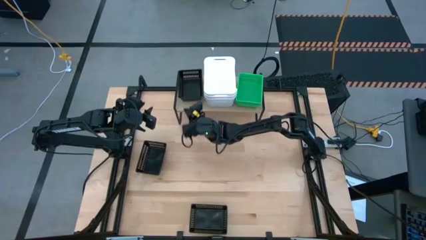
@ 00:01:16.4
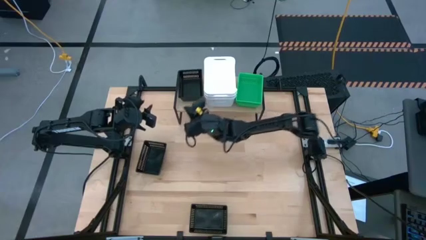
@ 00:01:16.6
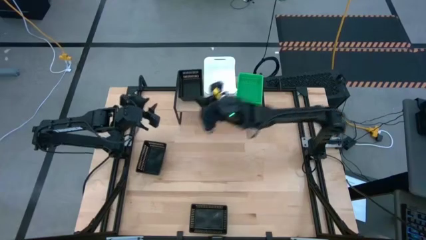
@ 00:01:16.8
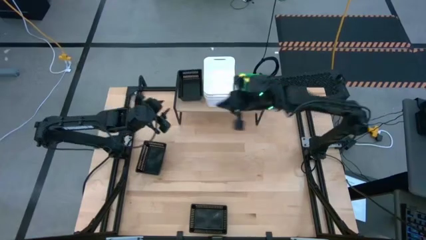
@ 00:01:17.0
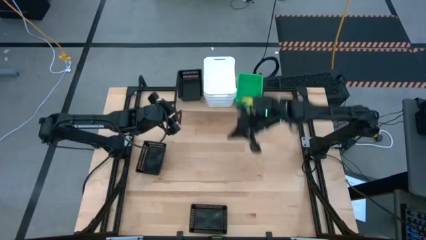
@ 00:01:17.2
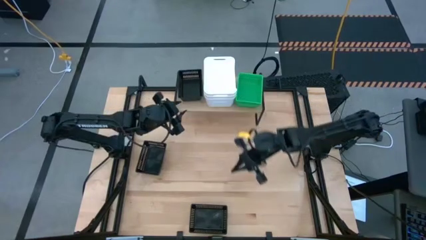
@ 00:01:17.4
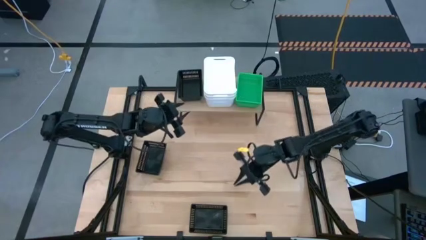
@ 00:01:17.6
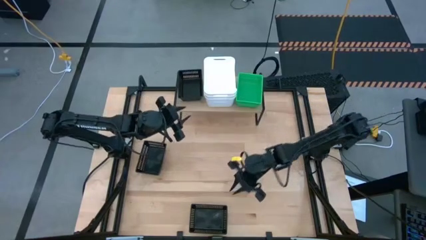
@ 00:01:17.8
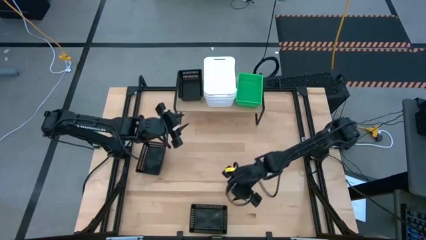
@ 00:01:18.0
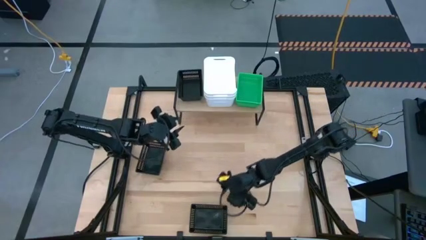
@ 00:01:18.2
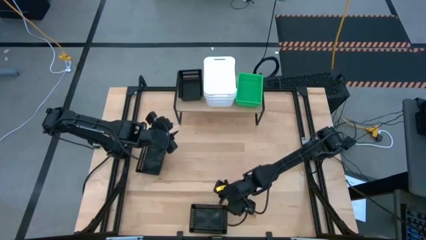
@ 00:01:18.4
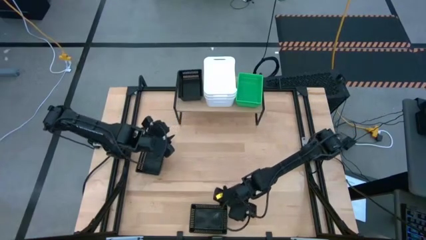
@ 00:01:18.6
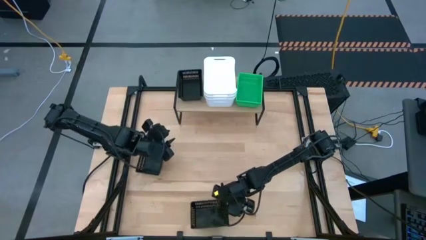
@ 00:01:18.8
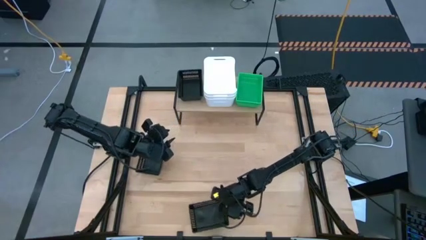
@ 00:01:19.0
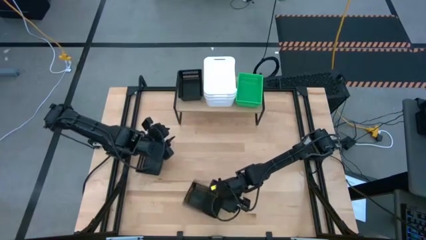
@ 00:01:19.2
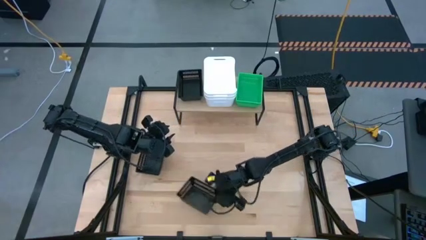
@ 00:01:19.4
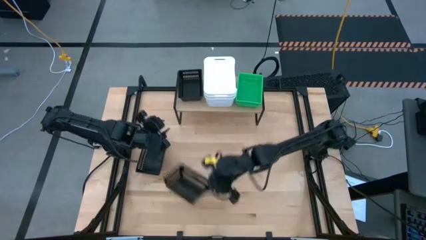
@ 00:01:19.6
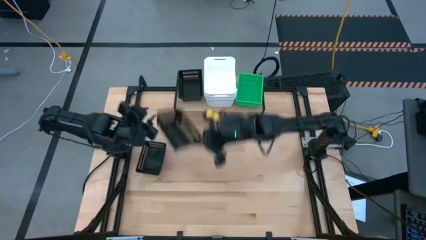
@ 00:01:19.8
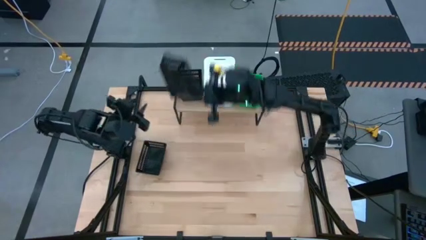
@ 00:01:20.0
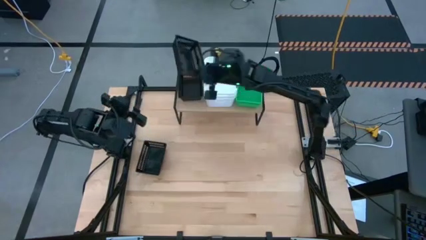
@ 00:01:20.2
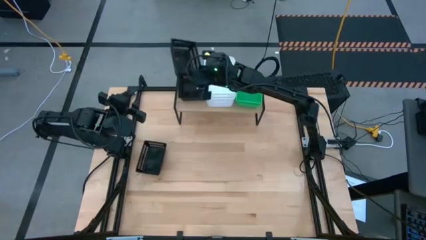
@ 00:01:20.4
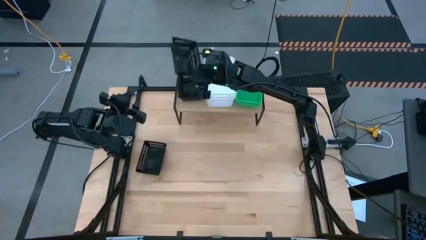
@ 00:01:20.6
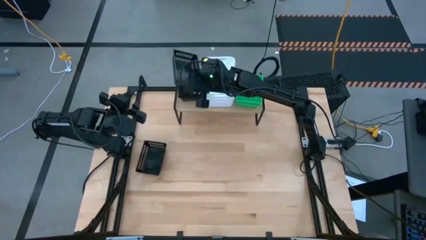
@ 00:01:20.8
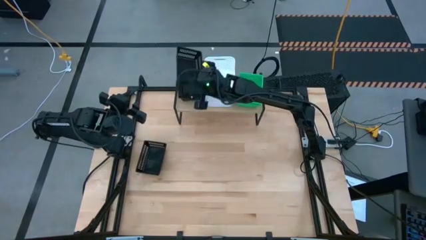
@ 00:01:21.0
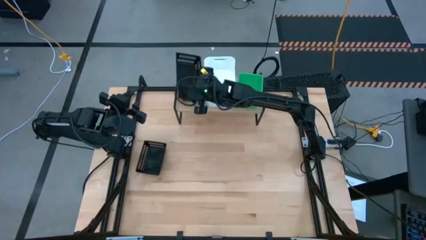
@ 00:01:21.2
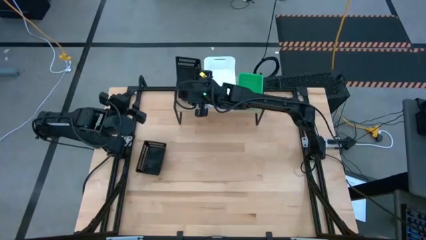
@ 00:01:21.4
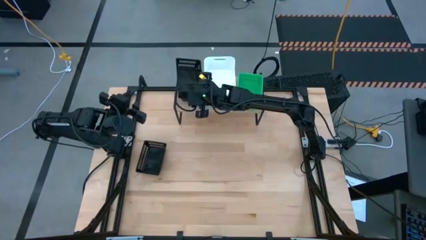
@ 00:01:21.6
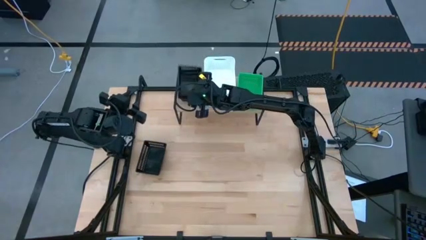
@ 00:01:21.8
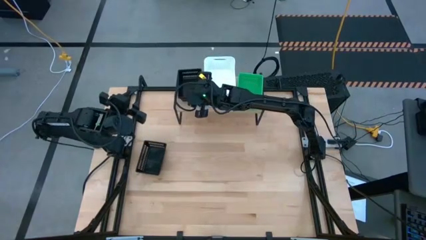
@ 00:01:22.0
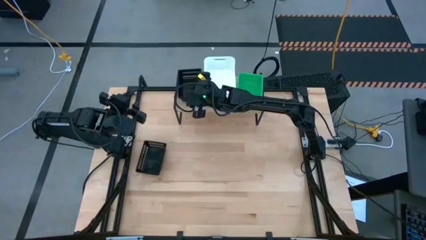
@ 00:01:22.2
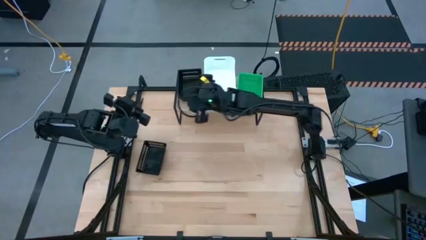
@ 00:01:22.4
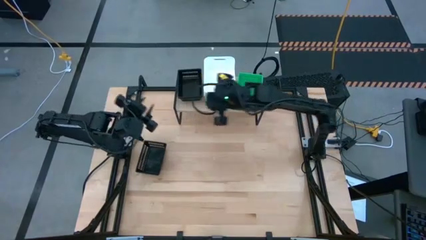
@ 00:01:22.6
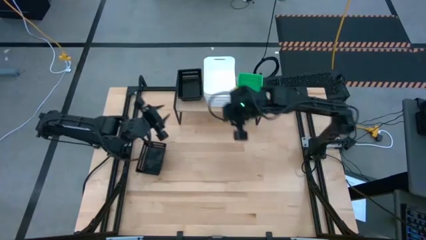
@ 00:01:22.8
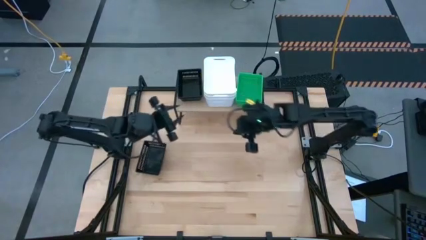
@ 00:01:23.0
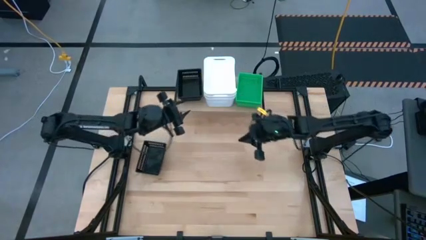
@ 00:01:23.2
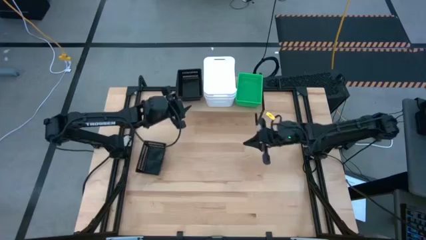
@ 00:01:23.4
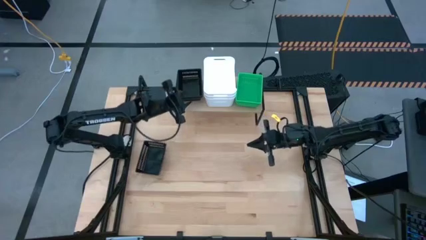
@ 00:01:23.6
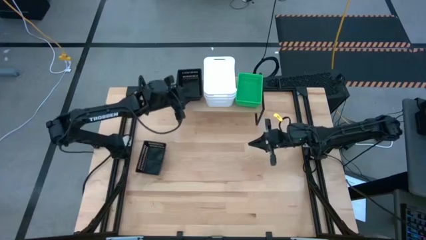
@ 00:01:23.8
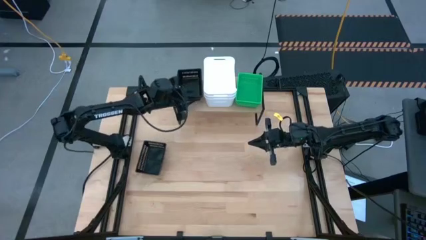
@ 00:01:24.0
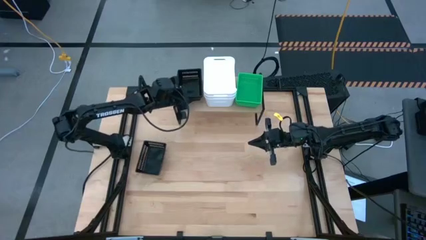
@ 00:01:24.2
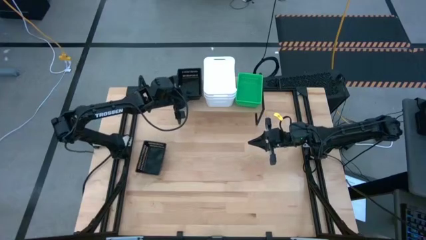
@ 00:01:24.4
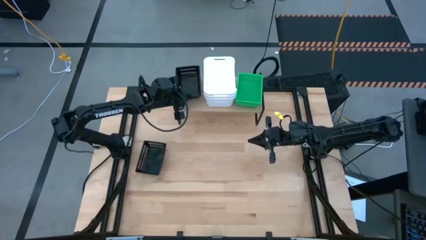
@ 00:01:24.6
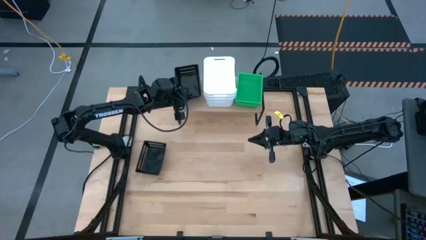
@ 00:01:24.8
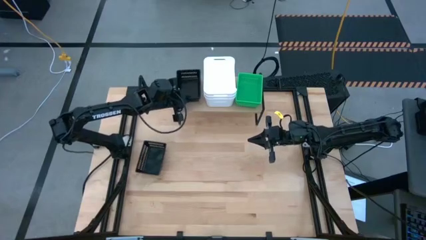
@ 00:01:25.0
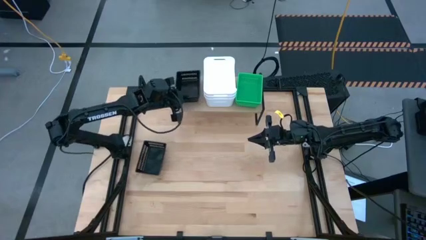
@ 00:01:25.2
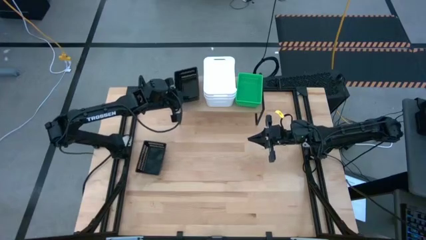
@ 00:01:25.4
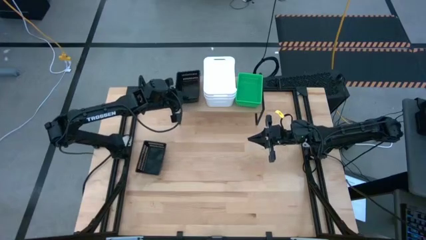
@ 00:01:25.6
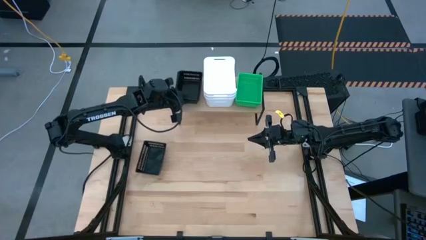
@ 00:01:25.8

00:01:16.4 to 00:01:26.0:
Task: Stack baskets on shelf by color
Stack the bottom black bin on top of the other black bin on the shelf

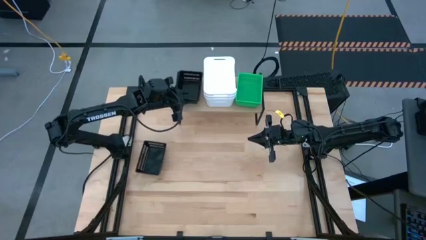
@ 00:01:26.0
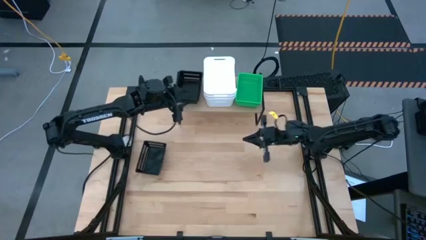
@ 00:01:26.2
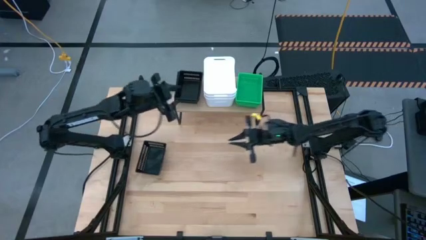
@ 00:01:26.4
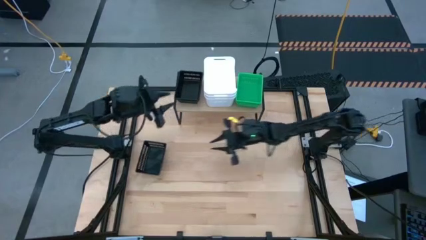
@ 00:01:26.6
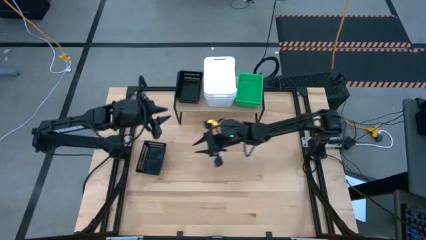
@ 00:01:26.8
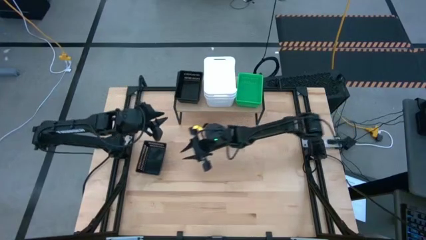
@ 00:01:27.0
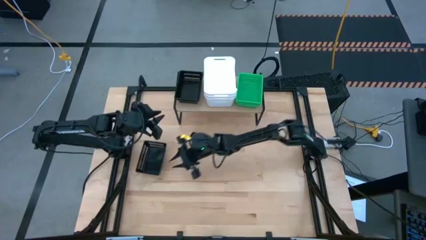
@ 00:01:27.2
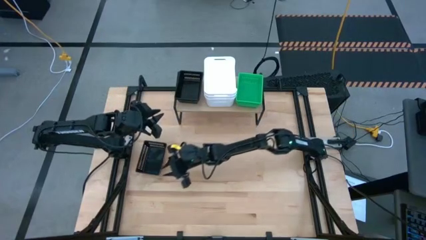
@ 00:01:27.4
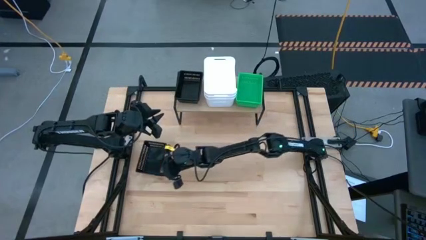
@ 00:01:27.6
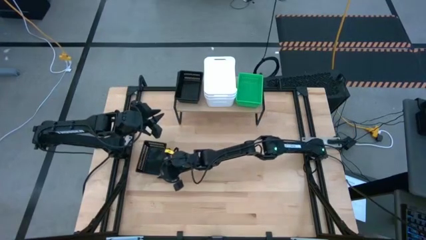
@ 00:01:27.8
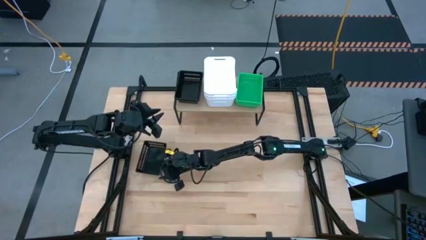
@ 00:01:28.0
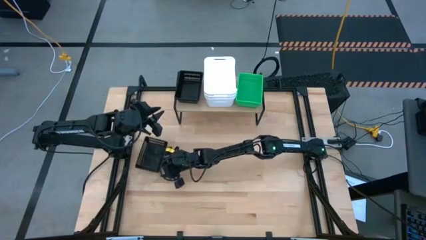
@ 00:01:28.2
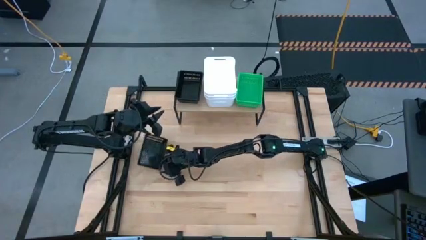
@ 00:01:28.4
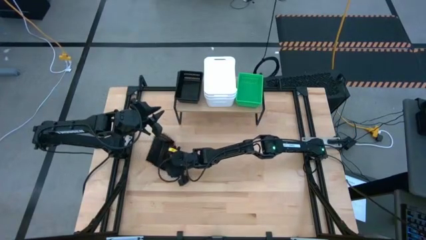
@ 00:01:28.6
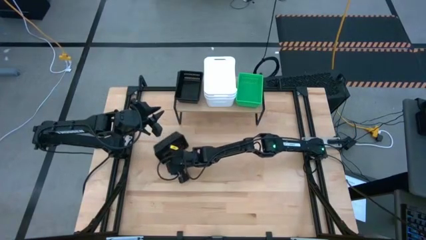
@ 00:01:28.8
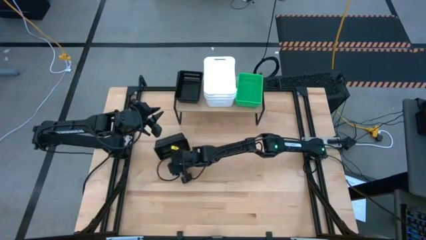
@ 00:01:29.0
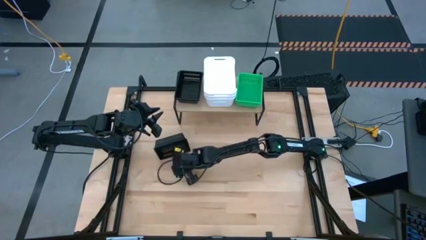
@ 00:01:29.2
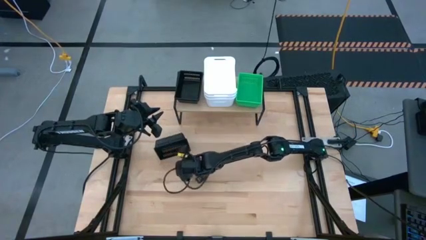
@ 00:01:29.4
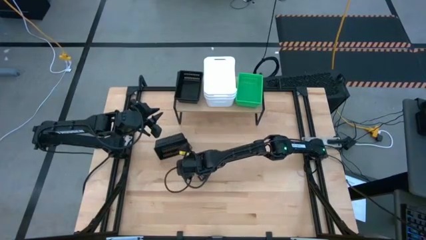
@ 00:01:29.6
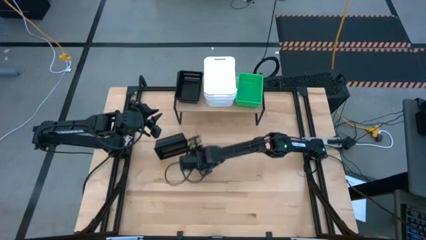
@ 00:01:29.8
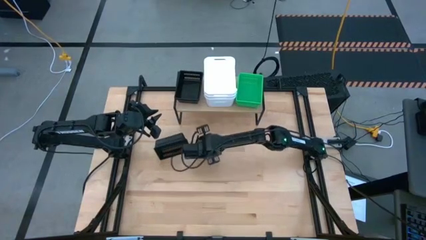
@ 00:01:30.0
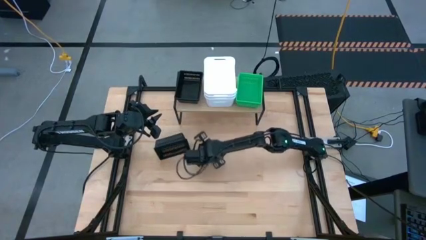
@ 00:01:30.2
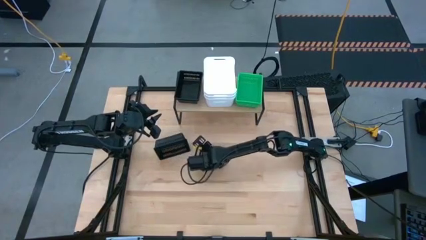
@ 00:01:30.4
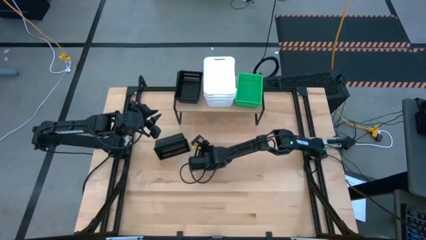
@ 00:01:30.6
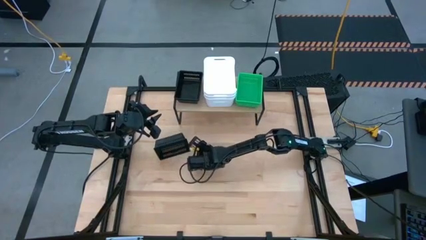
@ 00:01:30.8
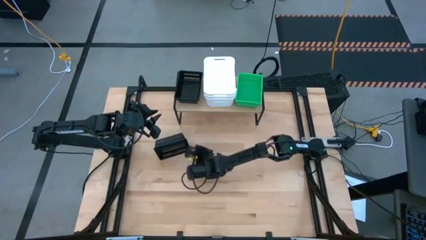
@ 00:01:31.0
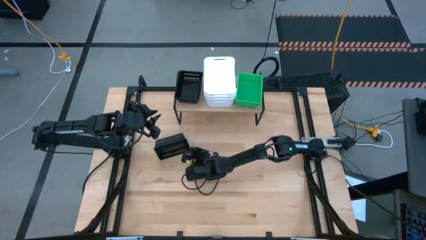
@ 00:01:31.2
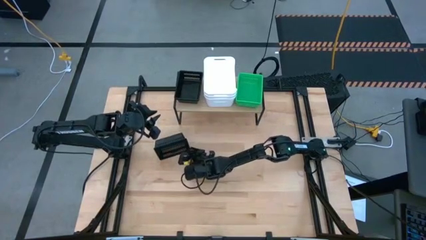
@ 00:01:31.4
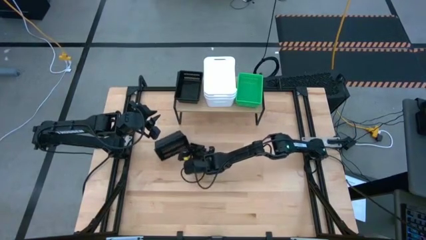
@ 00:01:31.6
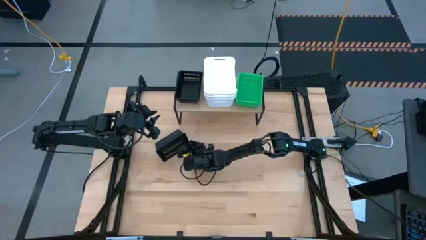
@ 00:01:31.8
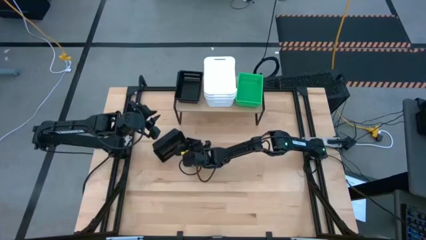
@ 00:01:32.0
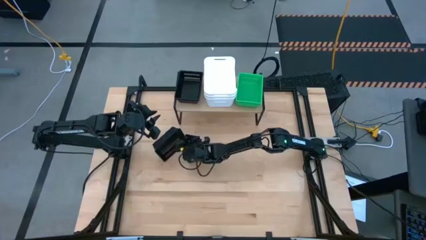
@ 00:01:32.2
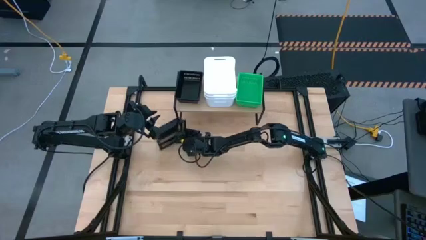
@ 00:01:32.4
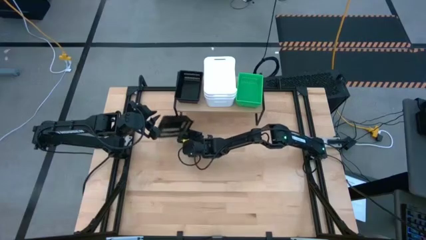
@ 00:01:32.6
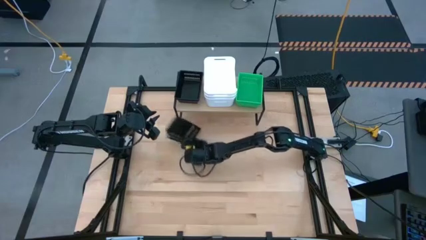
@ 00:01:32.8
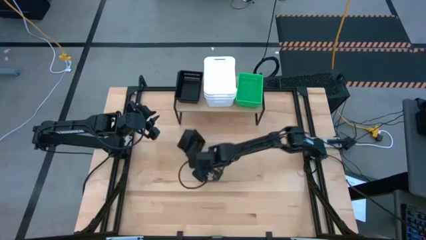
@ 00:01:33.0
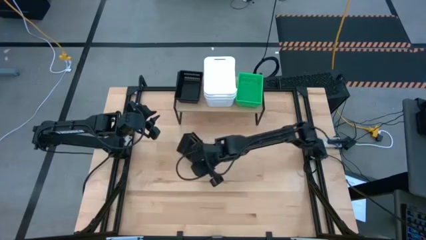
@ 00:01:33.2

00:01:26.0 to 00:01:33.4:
Stack the black bin on top of the other black bins on the shelf
